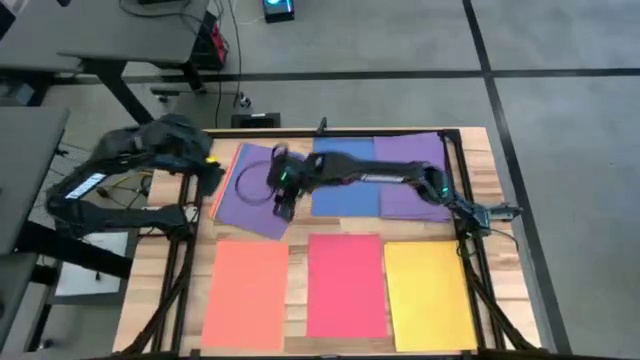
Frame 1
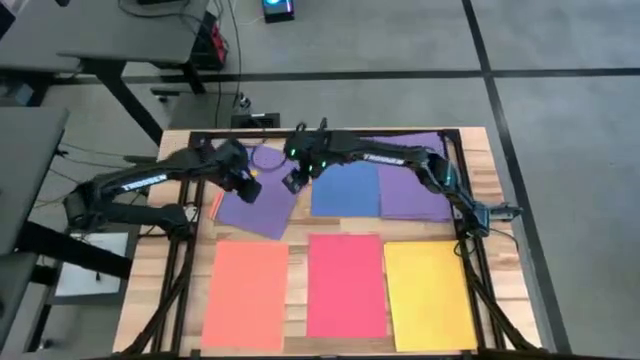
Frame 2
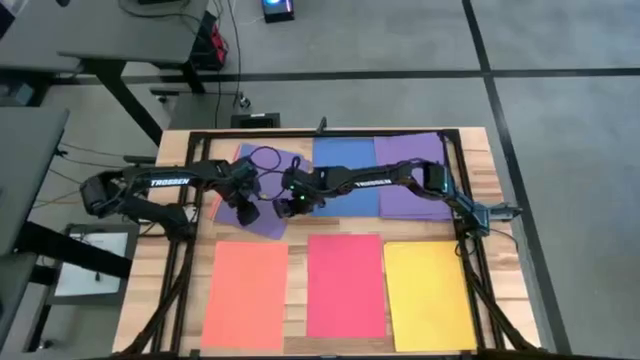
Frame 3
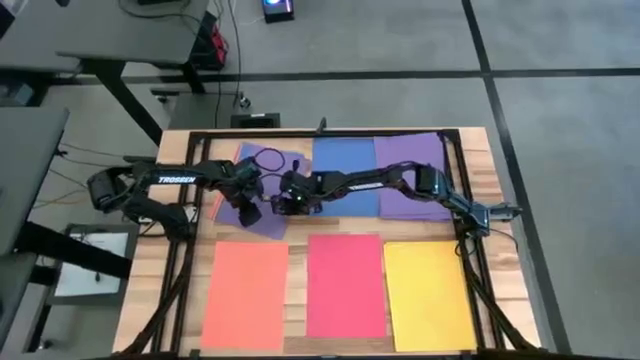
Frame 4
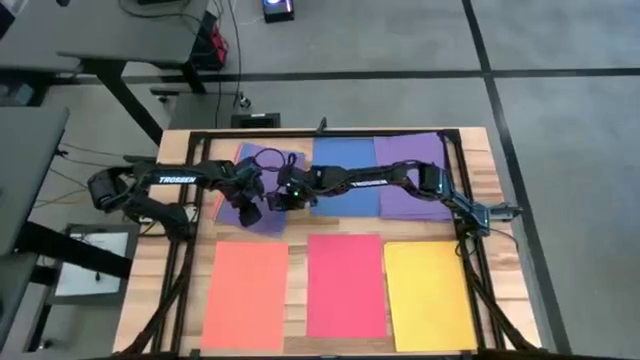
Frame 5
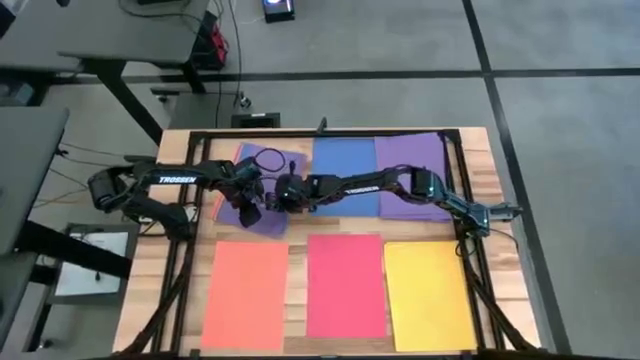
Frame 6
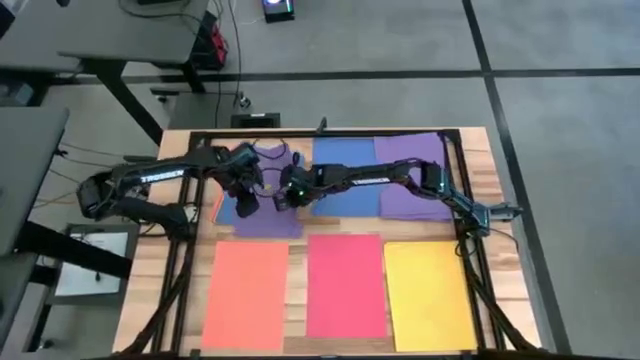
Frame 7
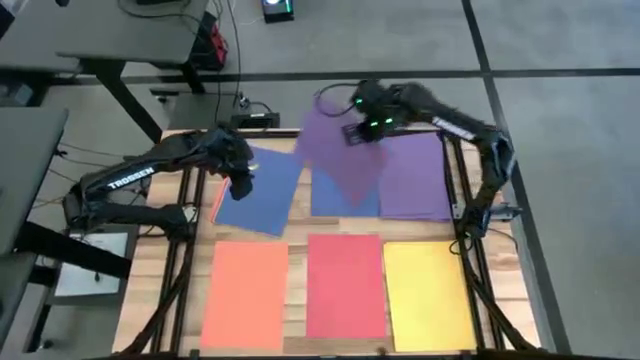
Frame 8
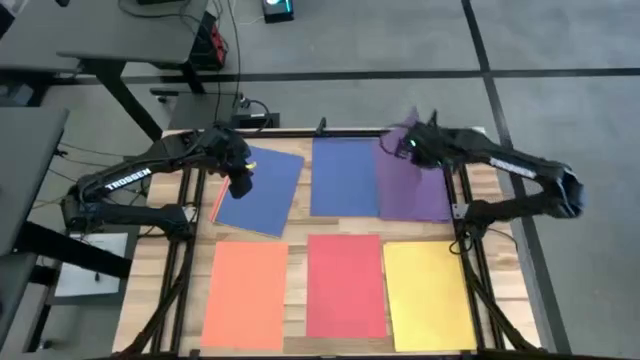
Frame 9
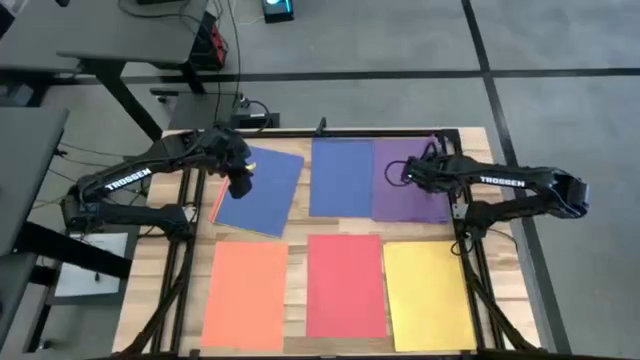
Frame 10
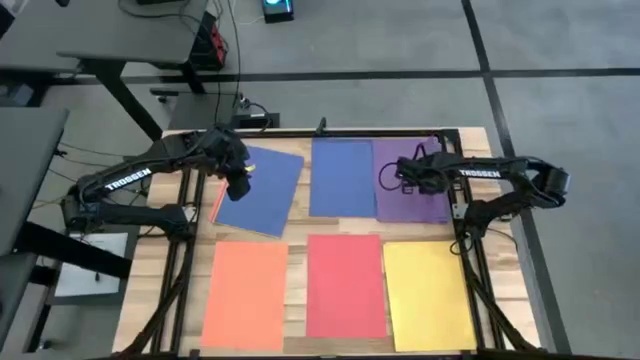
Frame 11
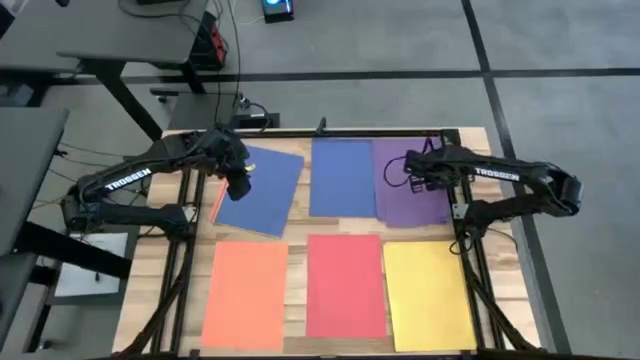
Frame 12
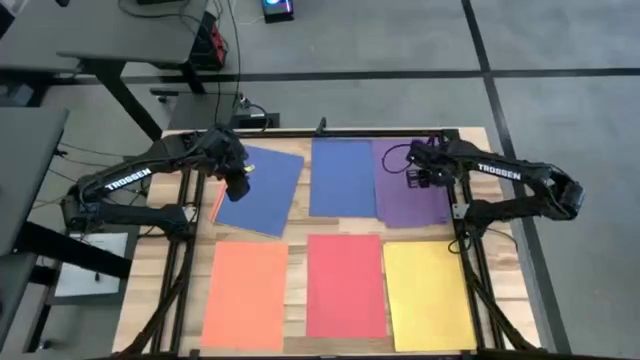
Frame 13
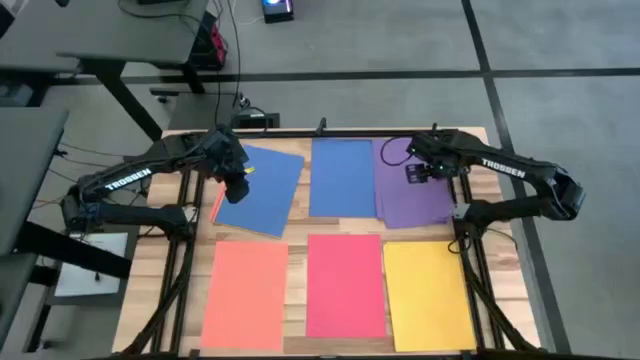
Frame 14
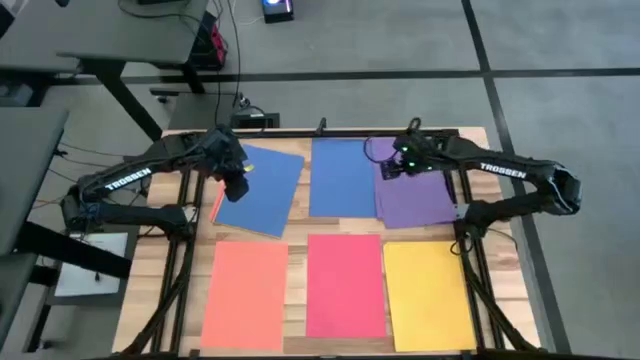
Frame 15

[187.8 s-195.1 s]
Task: Organize paper
Stack the purple paper on the top right purple papers

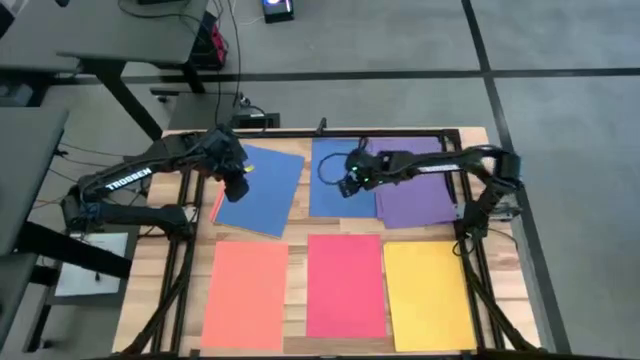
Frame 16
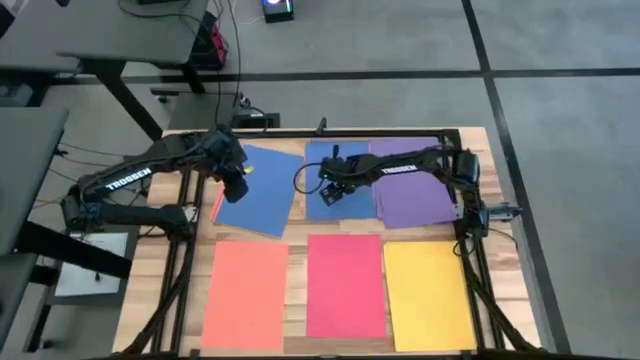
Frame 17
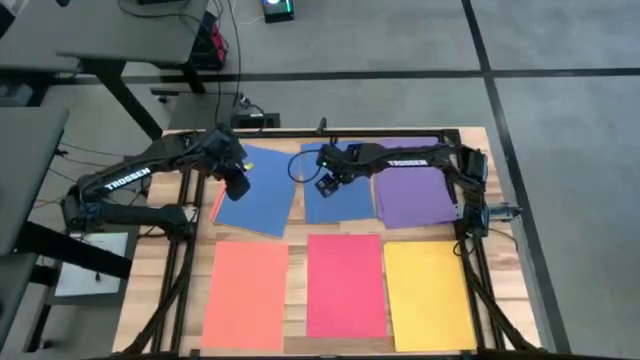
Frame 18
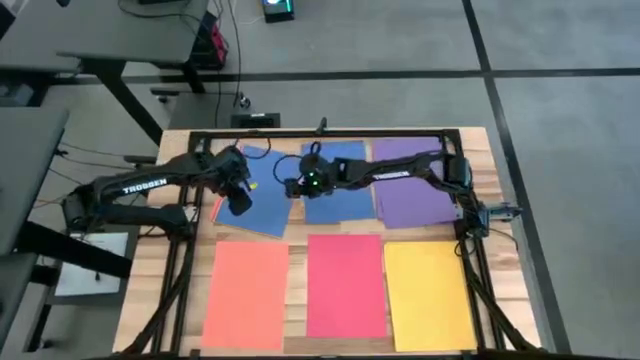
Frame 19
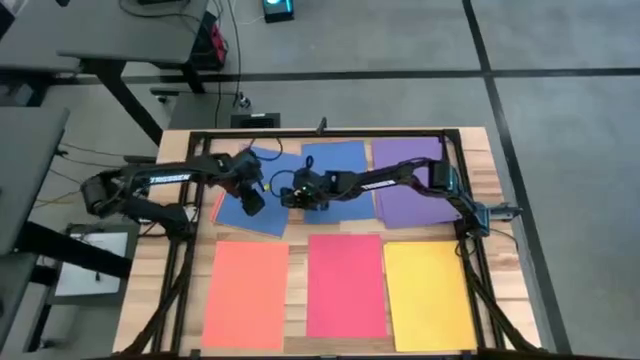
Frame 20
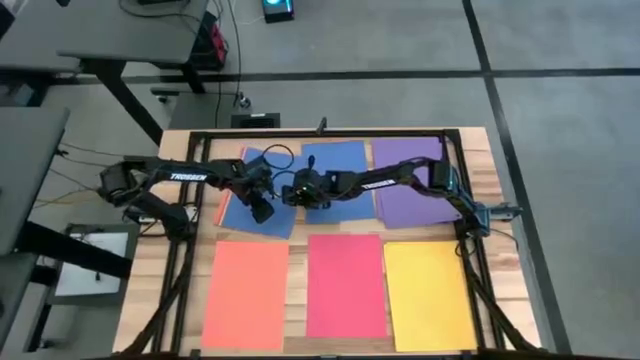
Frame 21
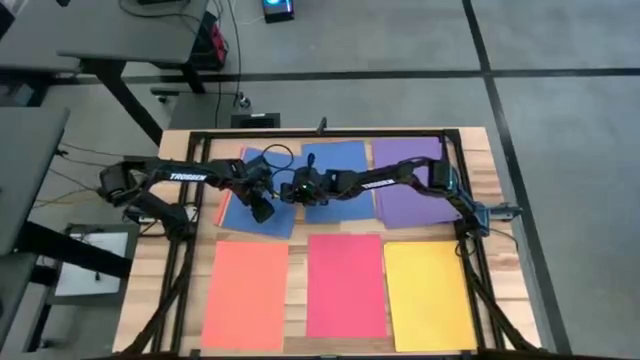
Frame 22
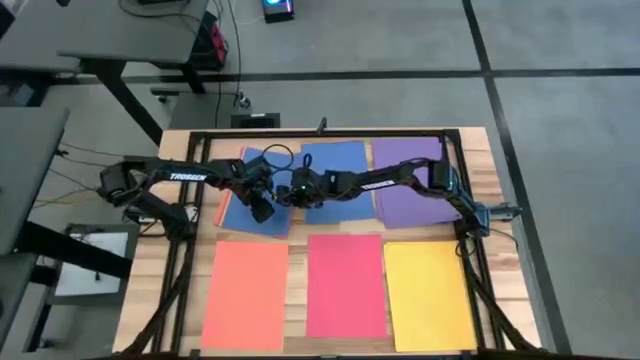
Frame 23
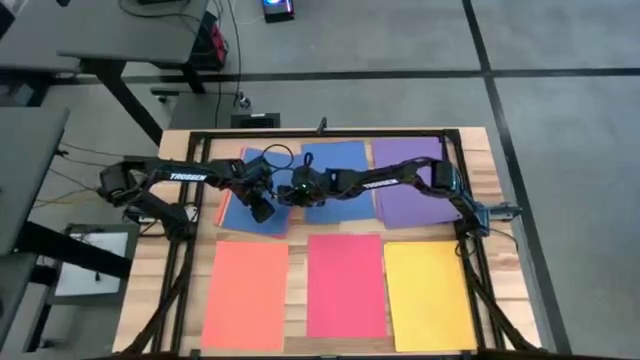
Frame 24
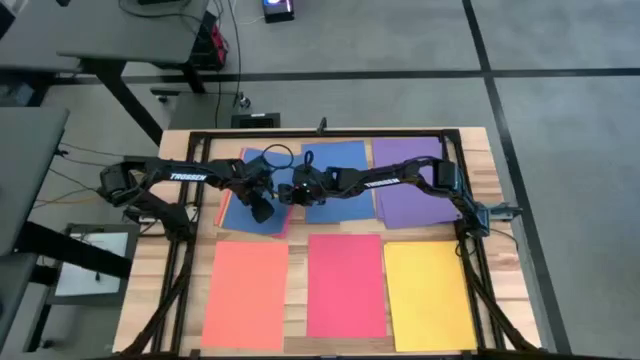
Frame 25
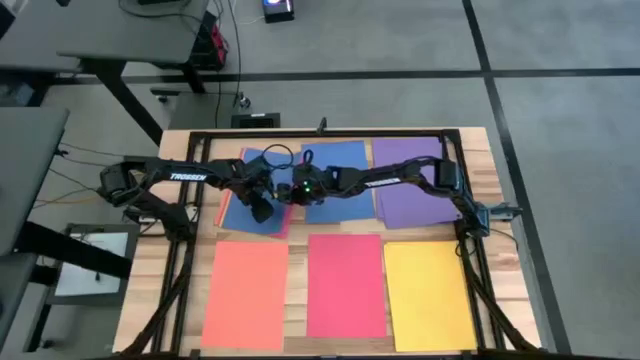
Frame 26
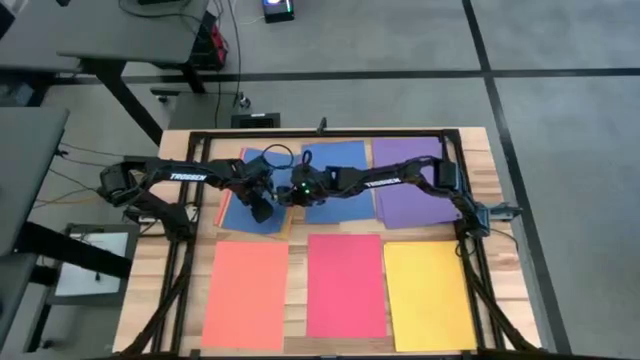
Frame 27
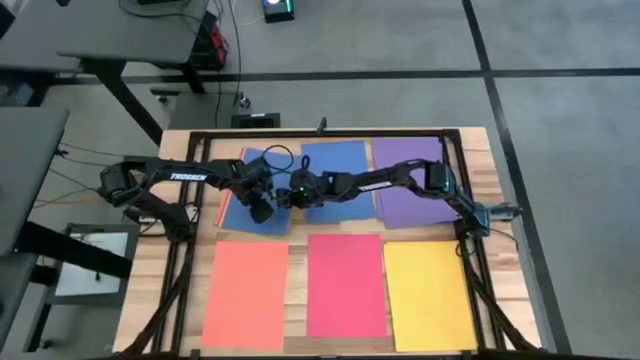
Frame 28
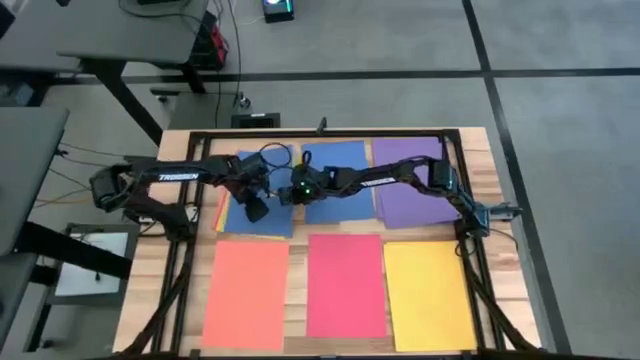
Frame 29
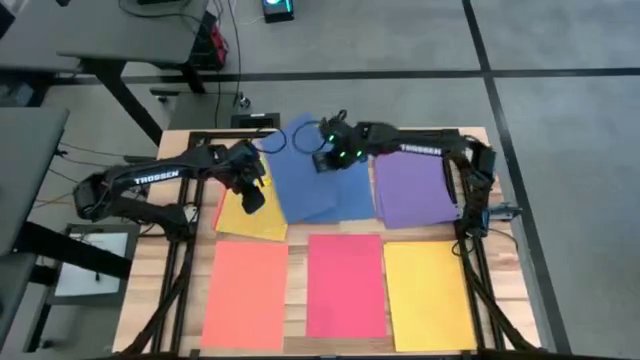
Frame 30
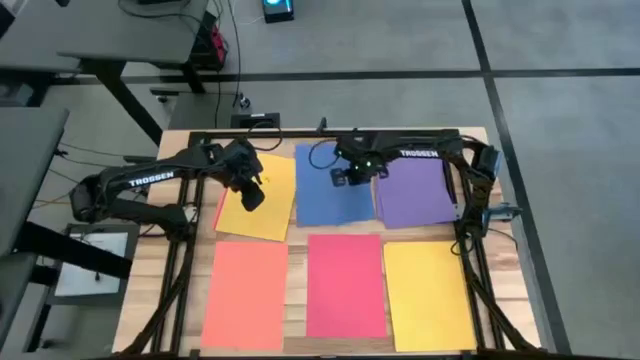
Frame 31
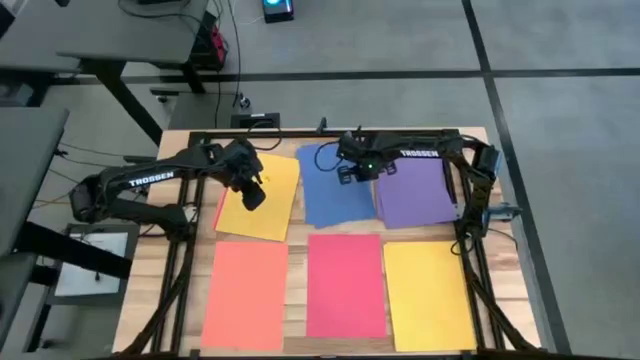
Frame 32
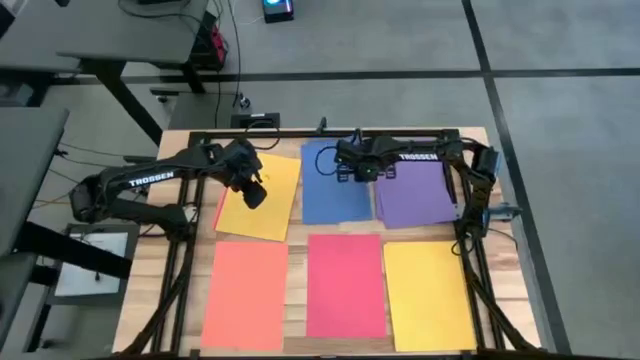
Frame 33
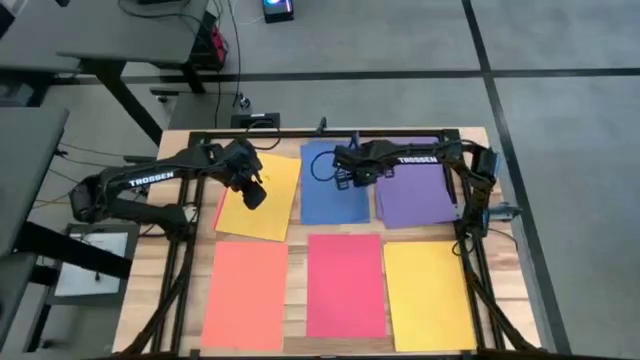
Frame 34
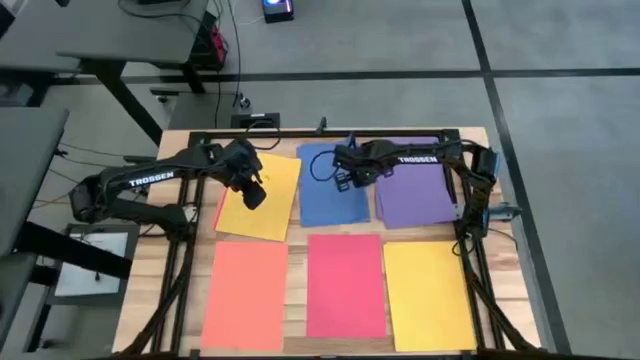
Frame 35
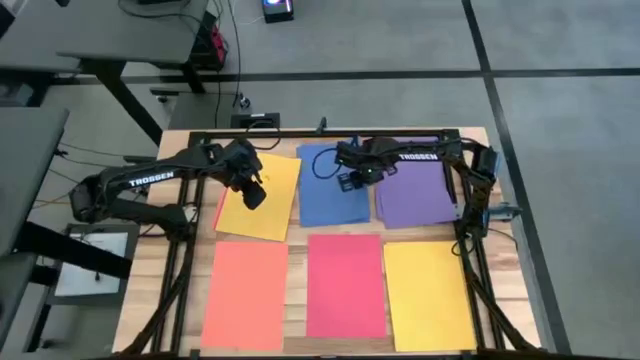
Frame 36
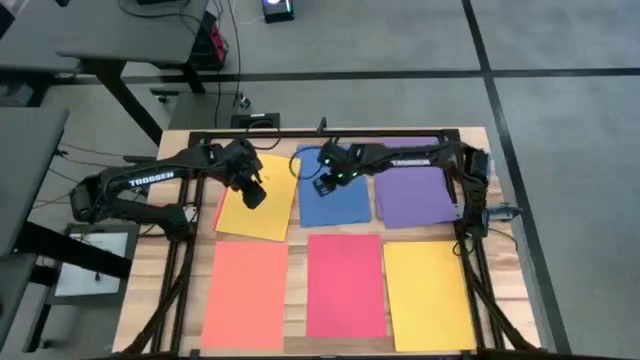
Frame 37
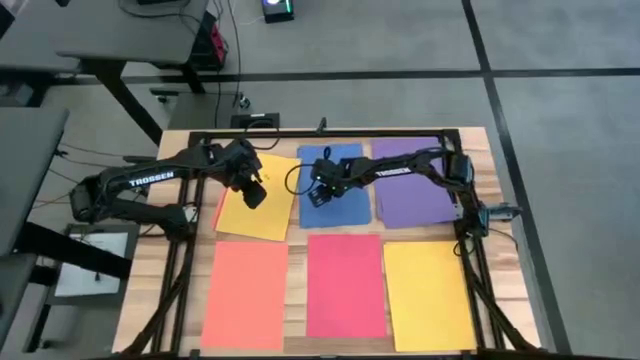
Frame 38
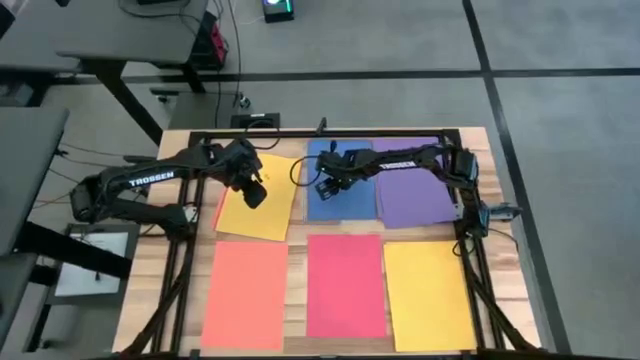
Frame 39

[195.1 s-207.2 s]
Stack the blue paper on the top center blue papers

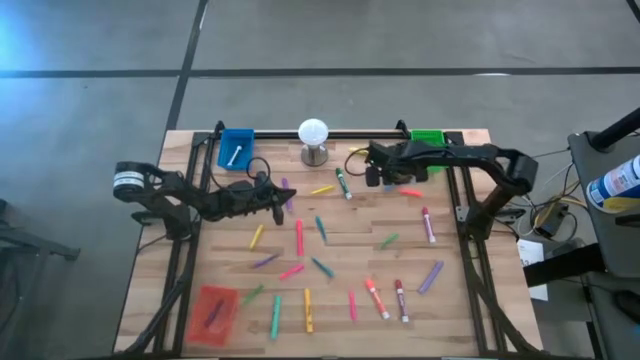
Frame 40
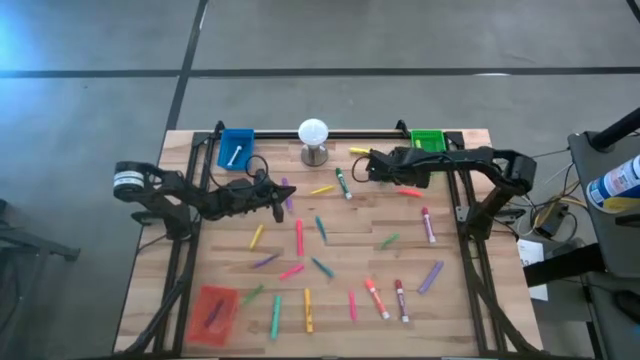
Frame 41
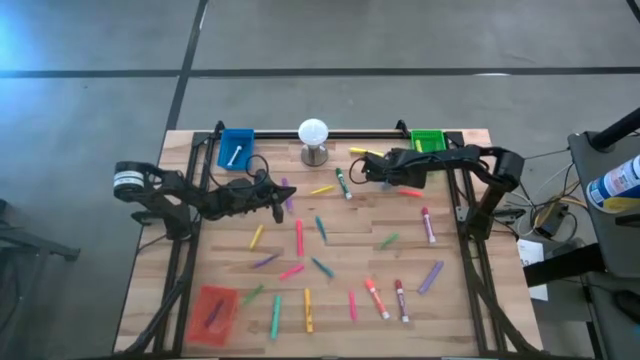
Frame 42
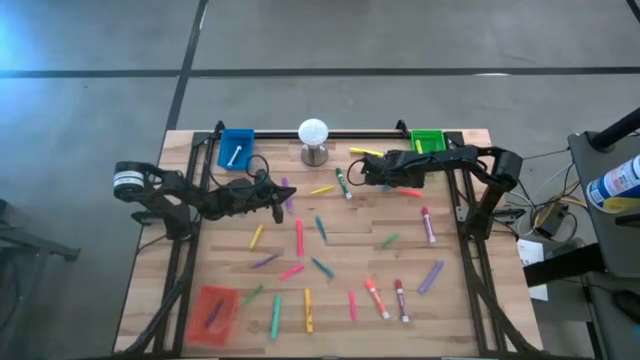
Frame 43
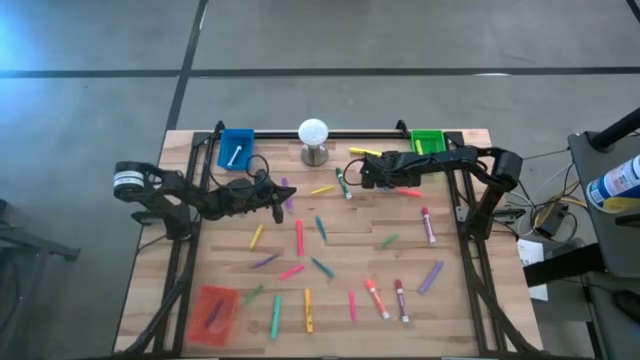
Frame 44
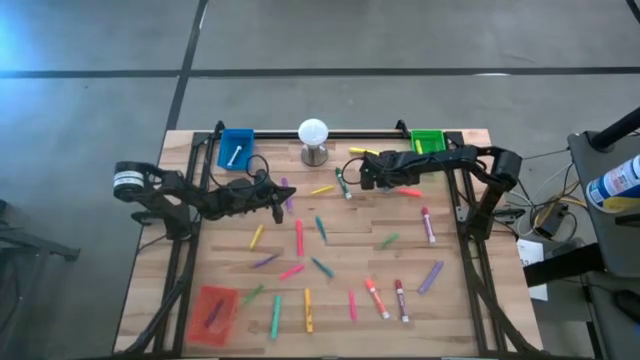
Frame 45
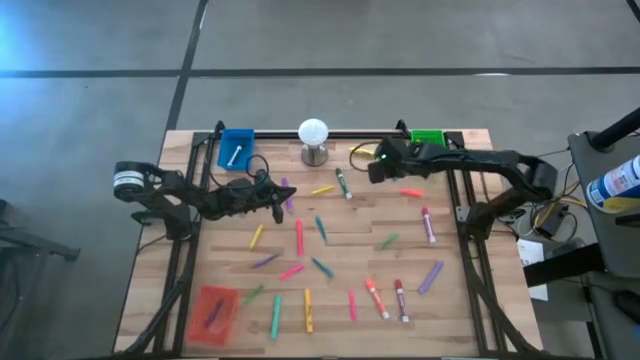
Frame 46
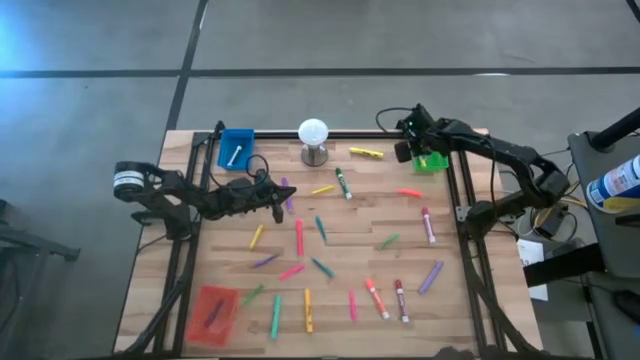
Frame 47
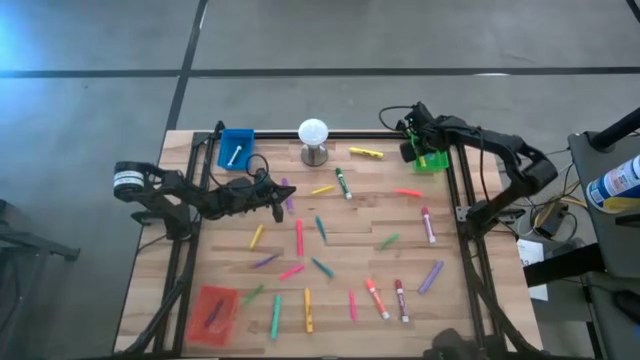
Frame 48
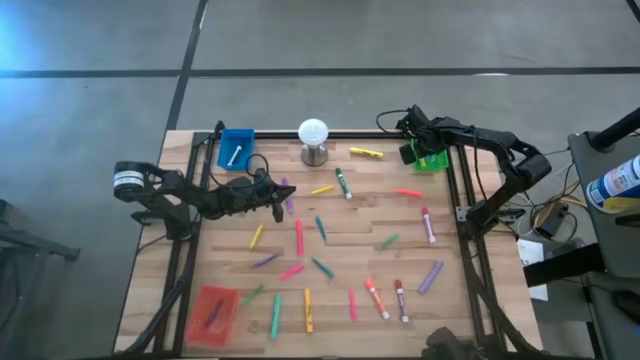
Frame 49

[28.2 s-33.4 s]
Task: Pick & Place Markers
Put the blue highlighter pen into the green bin
